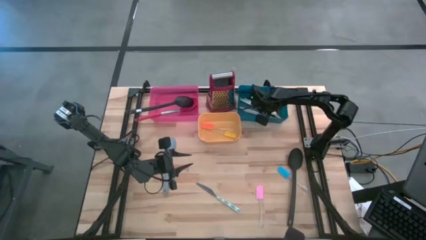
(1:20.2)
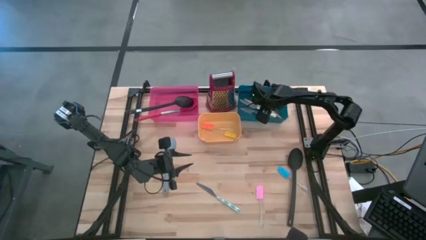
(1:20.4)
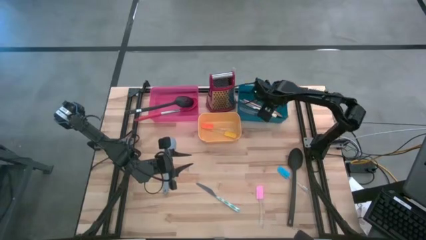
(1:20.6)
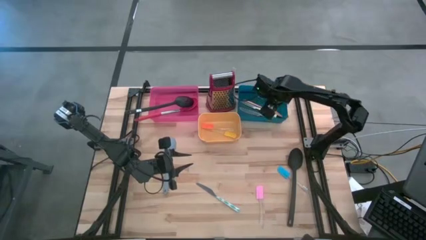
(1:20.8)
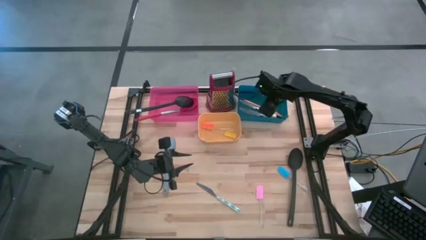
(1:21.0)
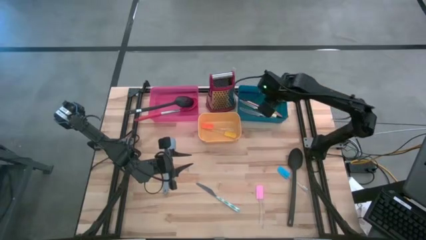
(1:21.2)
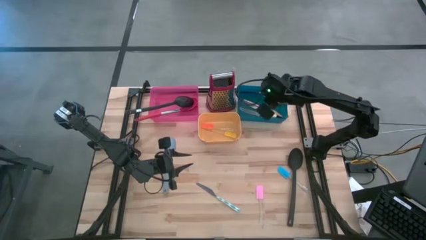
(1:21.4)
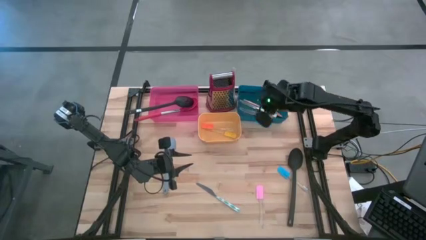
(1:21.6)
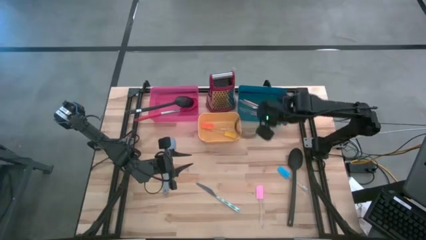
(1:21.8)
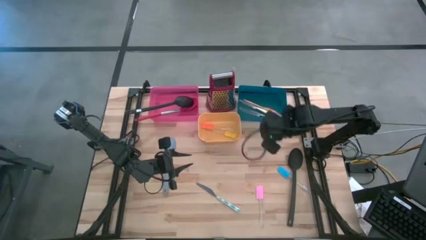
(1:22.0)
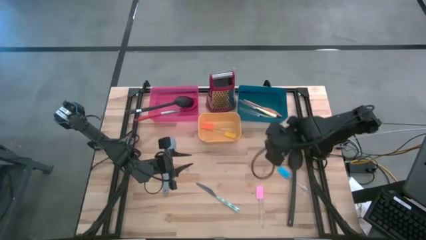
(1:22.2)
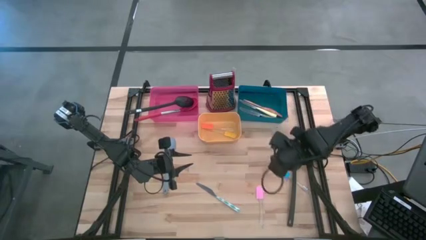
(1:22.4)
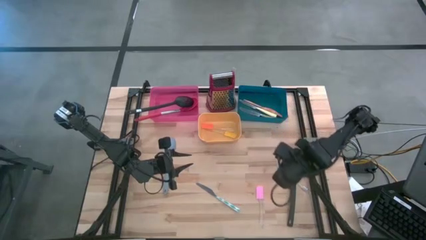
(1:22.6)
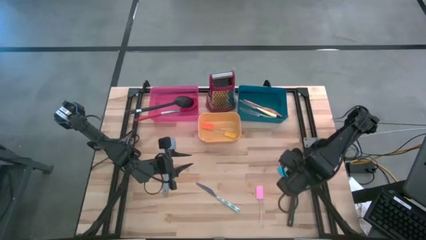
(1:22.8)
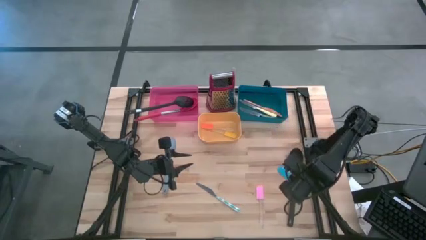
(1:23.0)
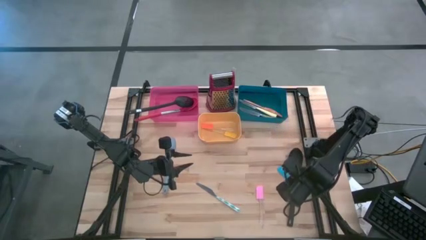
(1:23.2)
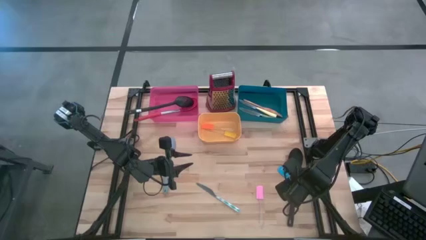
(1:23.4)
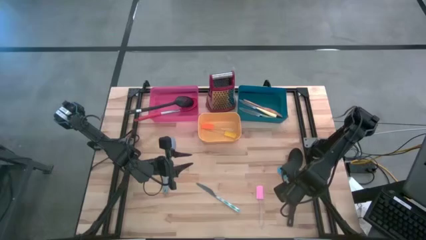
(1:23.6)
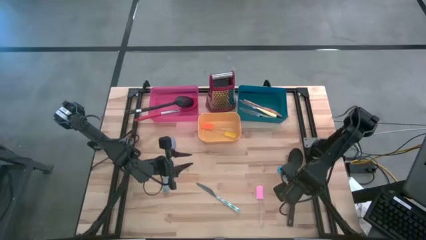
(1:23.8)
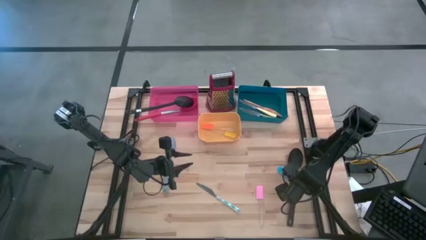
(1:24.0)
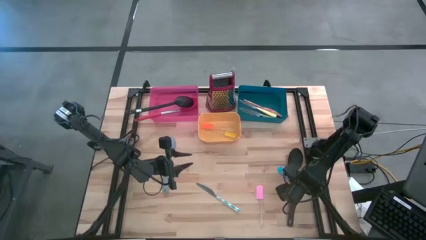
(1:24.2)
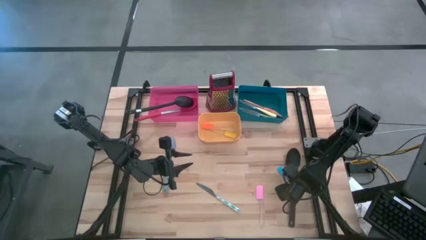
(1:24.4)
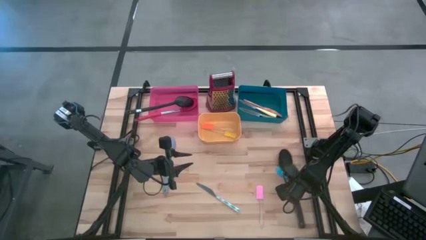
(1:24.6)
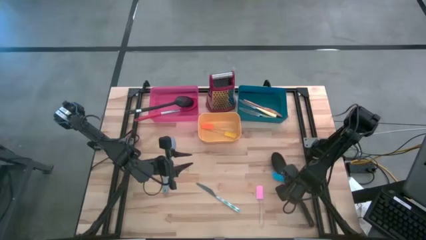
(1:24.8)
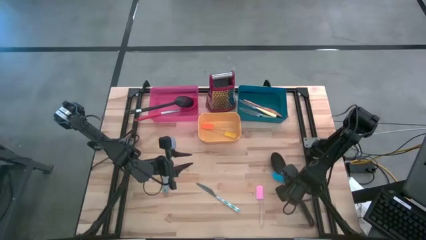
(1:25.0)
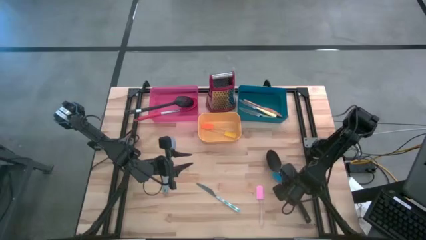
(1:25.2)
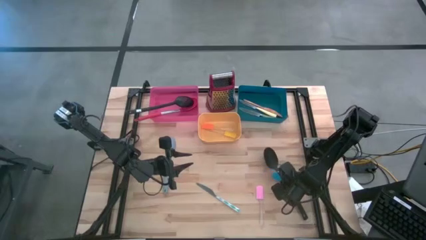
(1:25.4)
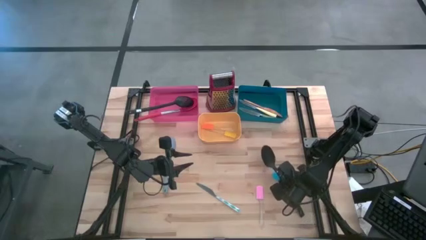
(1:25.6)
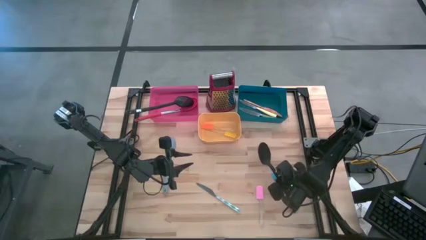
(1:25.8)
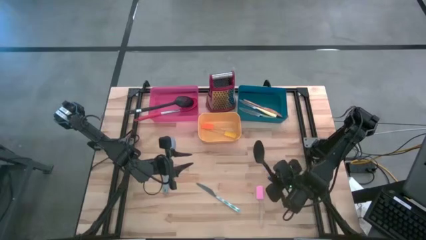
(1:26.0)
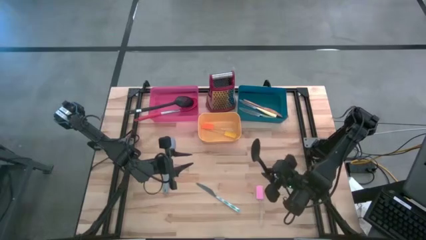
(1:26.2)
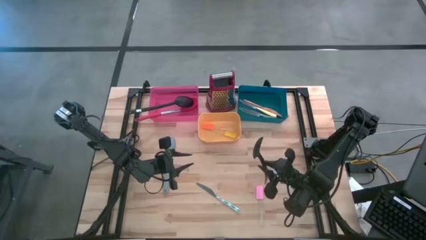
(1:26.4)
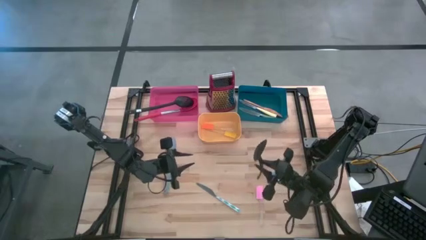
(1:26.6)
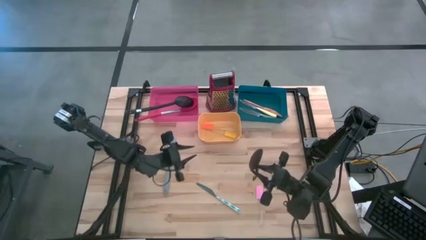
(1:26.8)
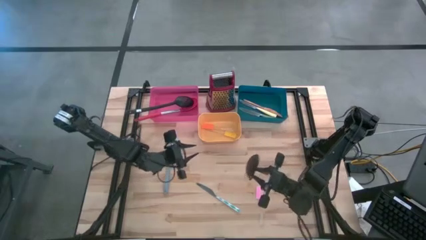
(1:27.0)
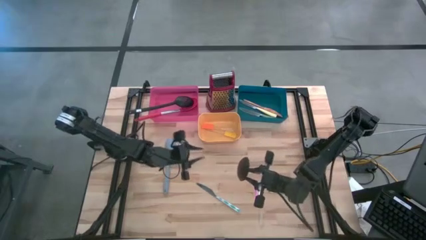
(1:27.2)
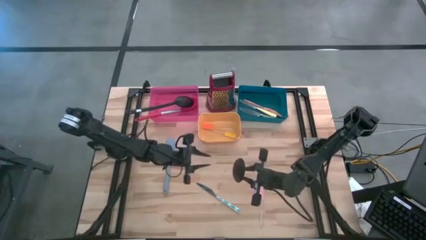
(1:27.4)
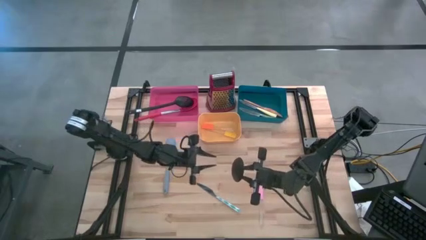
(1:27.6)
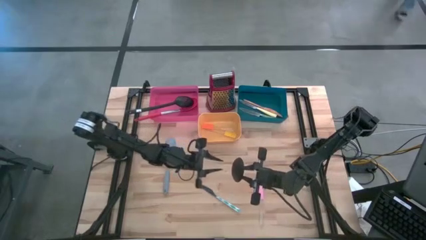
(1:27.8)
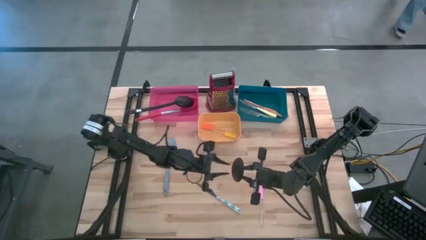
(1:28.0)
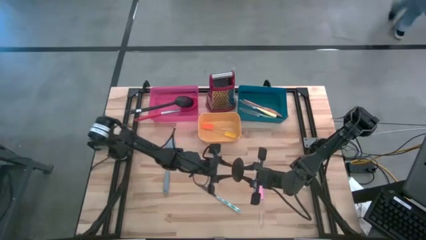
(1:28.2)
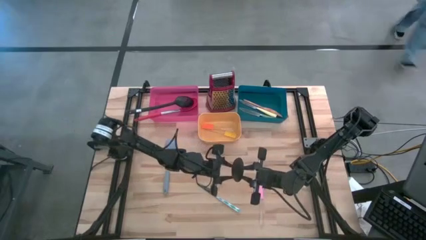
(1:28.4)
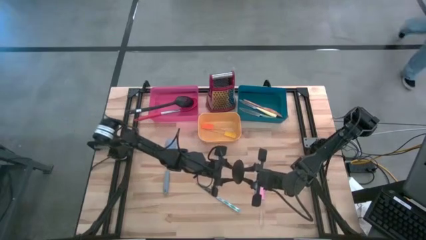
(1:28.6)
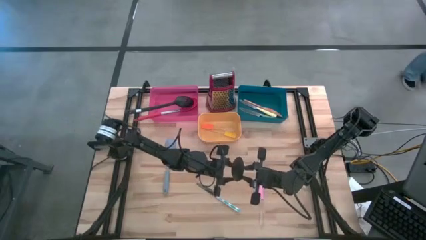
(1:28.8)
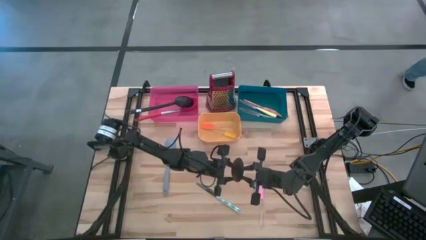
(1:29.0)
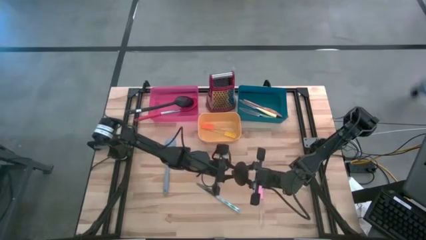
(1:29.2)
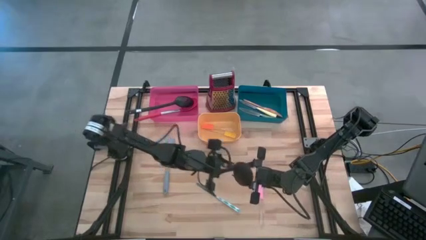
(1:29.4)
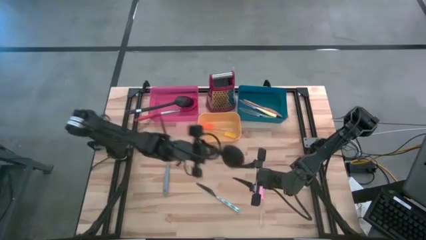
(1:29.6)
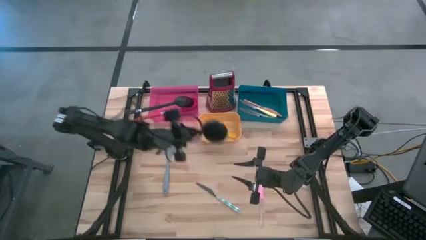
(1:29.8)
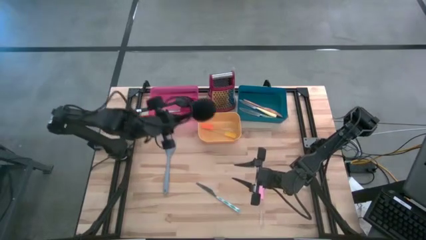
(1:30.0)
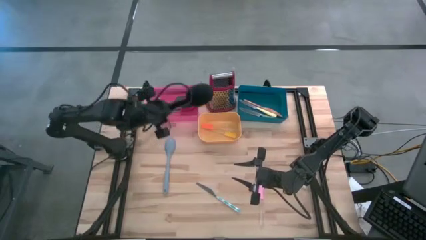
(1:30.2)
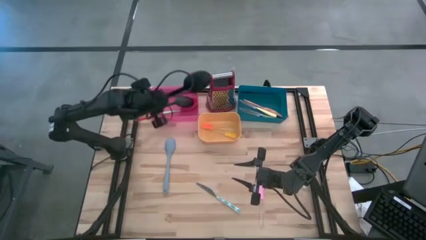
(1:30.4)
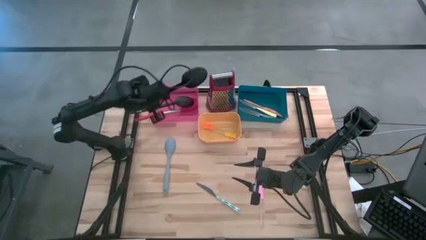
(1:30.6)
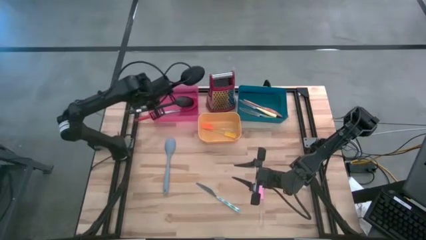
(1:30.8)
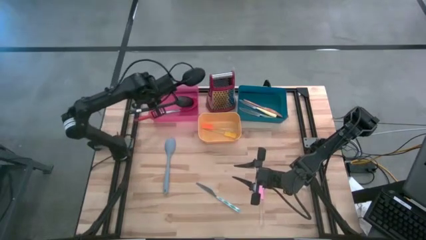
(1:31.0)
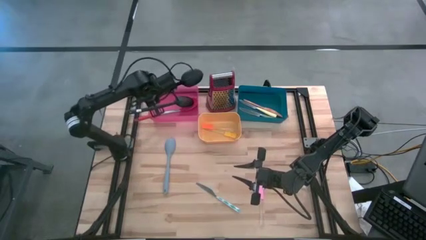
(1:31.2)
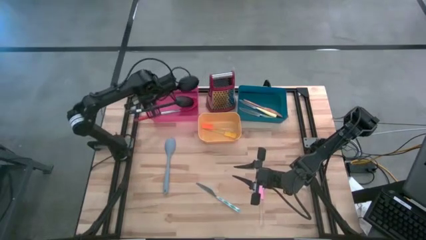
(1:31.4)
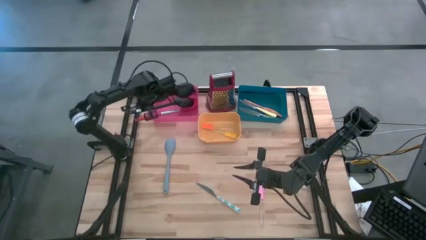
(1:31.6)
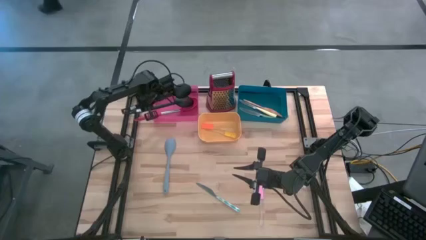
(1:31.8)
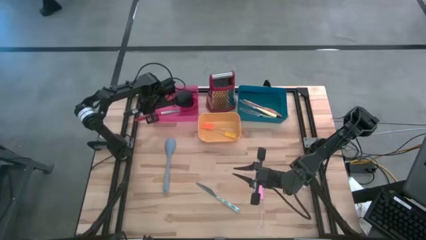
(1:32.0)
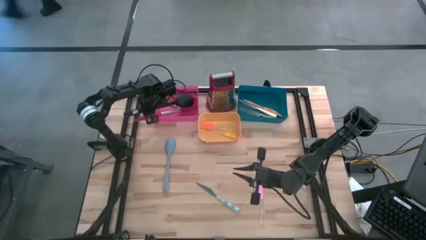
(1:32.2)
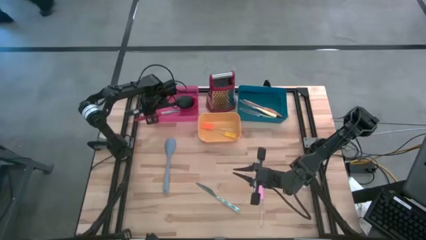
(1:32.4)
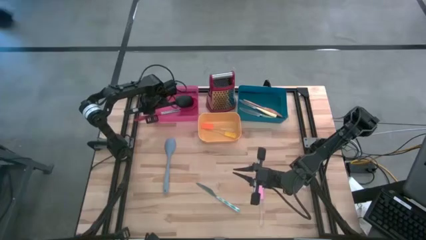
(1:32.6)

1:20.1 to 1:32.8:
Task: Pick & Place Kitchen Items
Put the black serving spoon into the red bin

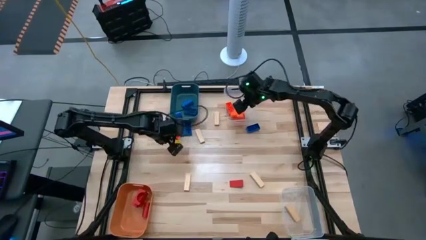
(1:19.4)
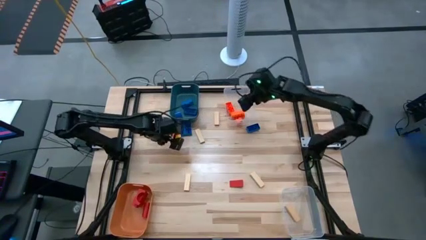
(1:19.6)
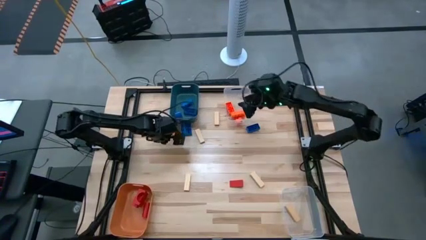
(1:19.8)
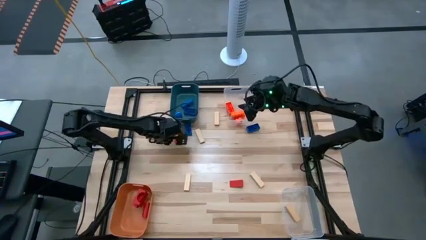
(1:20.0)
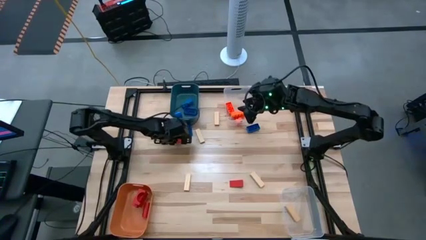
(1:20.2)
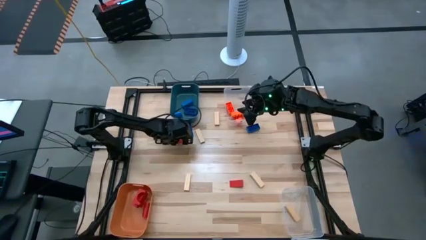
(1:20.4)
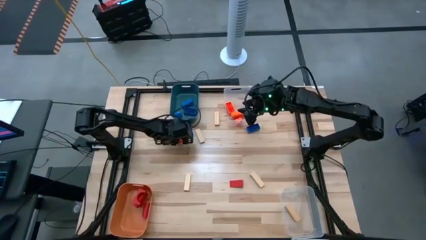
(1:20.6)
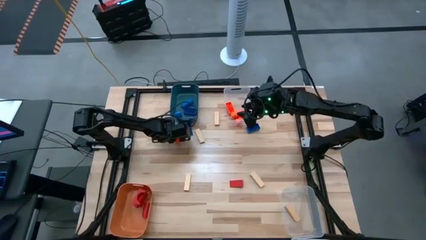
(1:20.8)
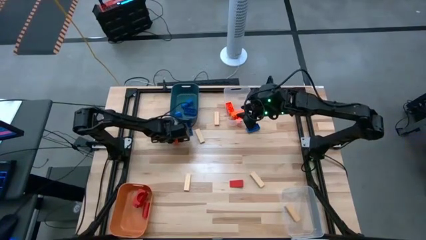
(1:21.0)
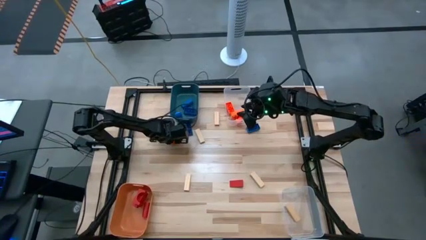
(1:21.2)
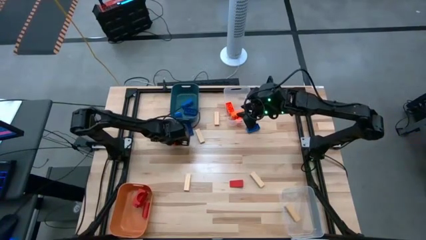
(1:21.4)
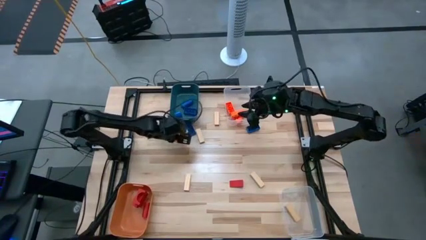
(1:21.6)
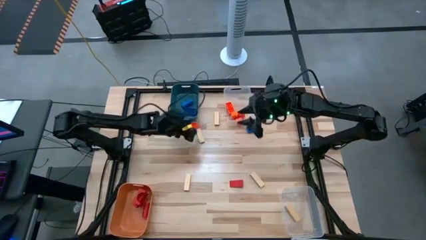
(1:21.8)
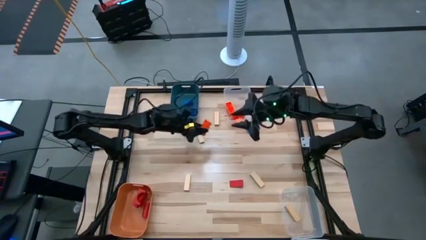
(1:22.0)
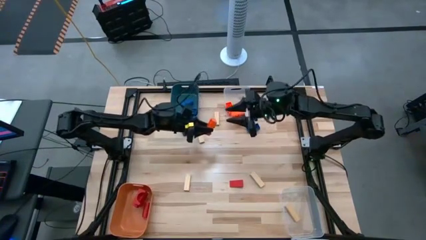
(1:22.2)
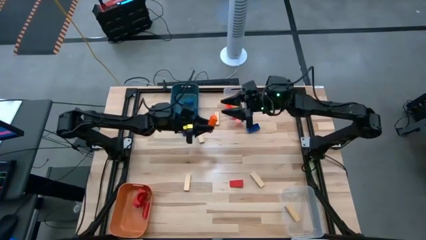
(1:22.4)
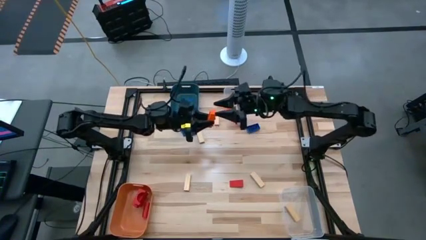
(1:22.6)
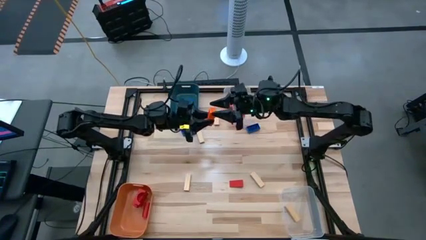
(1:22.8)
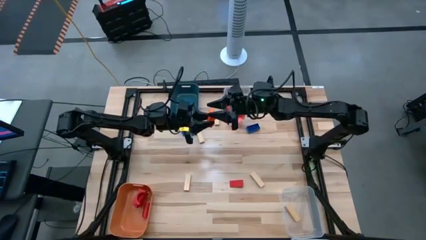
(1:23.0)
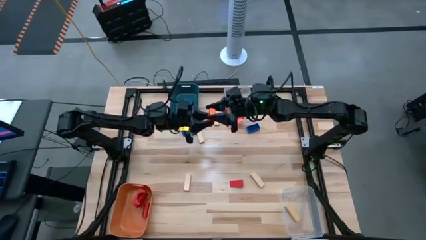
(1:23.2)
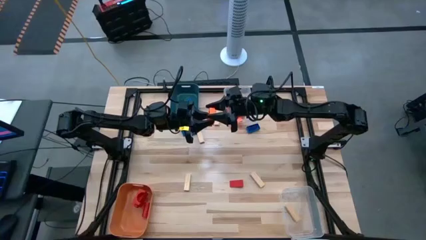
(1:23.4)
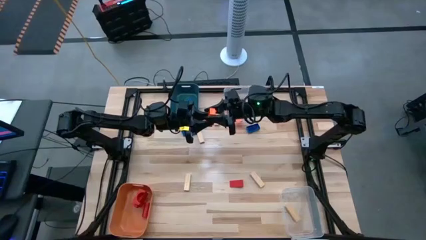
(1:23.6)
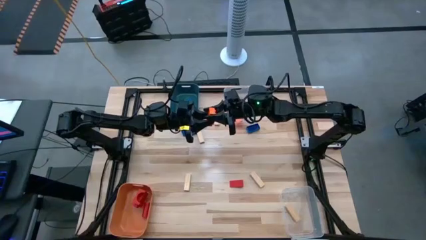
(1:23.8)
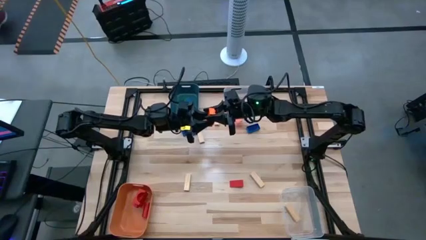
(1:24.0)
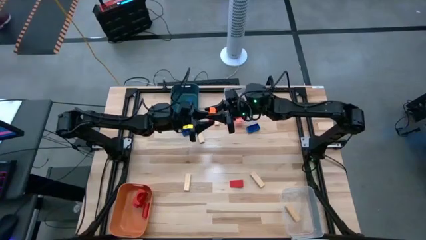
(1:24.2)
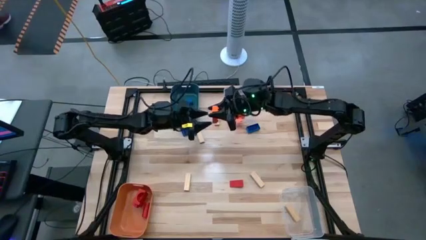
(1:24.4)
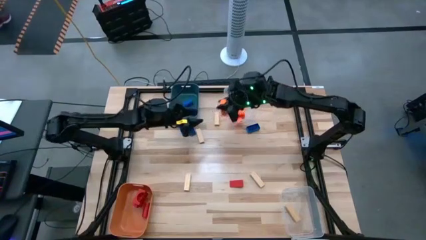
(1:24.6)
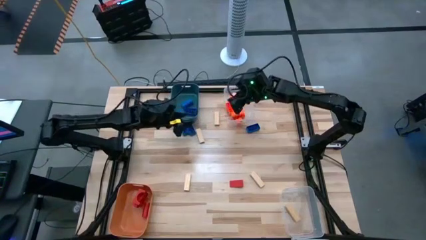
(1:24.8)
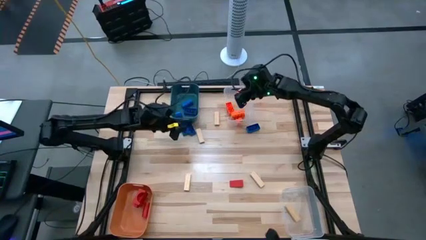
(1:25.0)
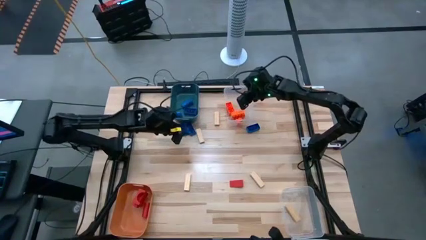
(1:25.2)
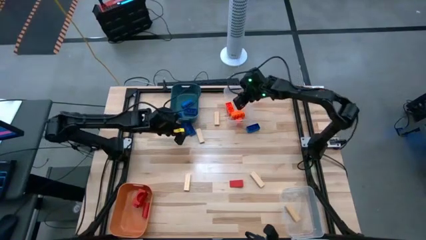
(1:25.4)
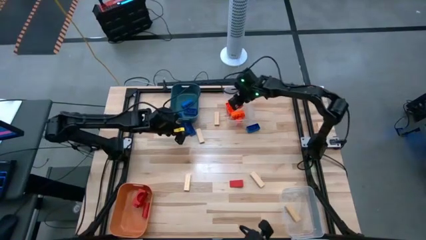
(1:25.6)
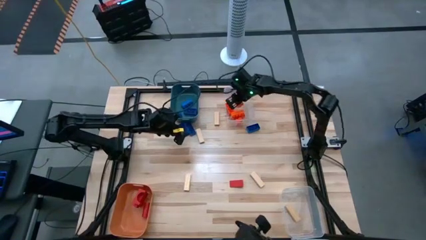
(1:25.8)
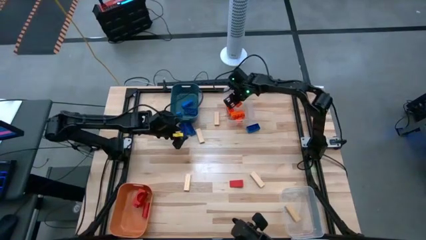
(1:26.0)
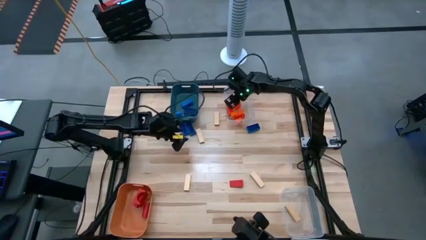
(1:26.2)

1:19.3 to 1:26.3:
Task: Sort blocks
Put the orange game piece into the top transparent bin
